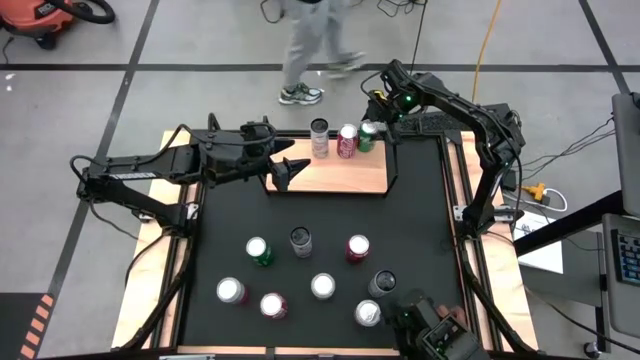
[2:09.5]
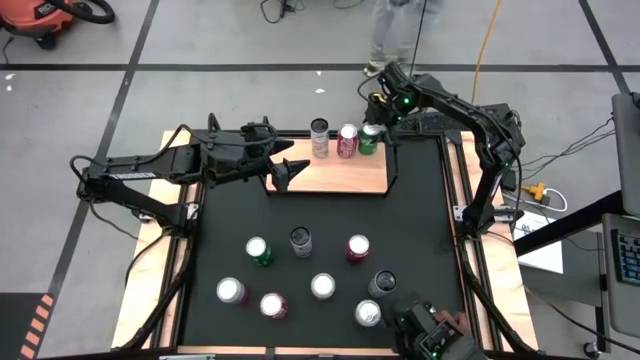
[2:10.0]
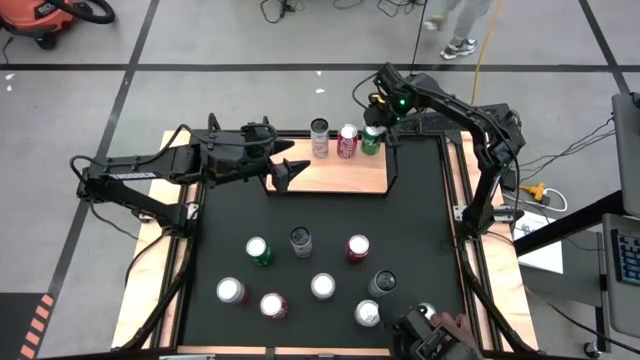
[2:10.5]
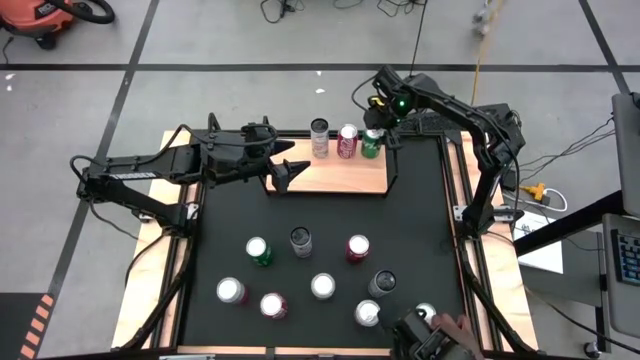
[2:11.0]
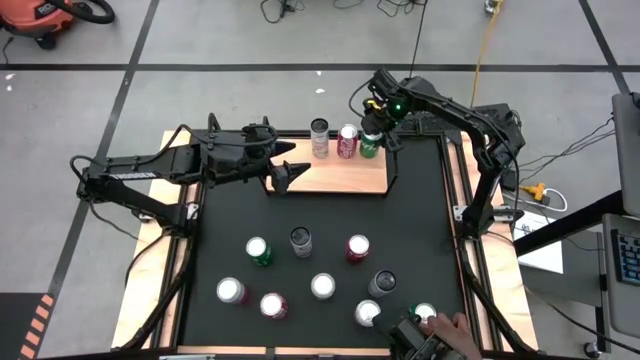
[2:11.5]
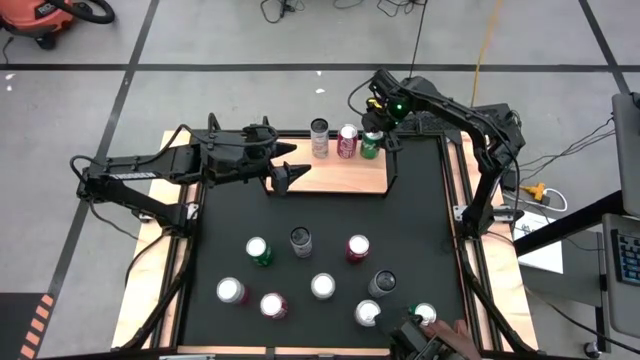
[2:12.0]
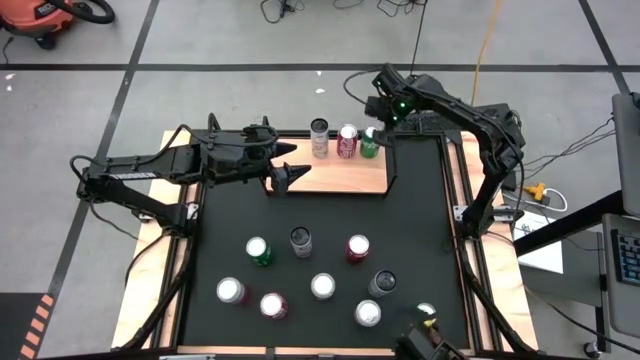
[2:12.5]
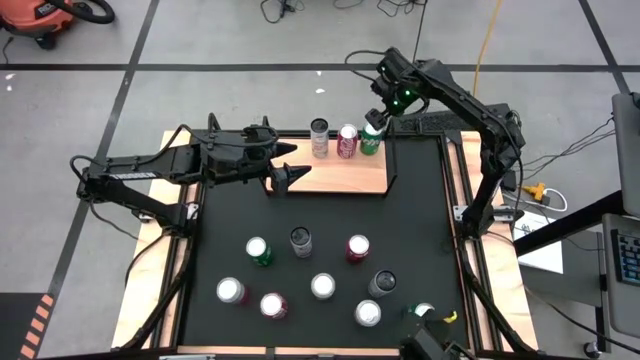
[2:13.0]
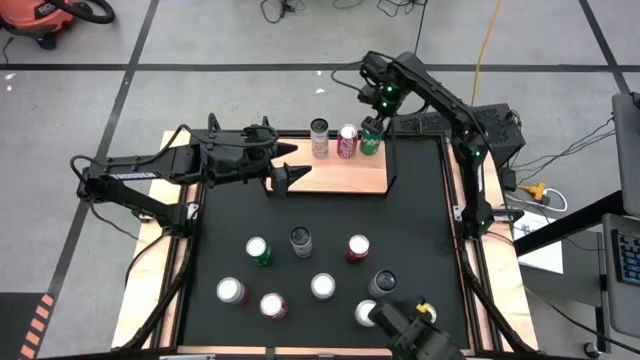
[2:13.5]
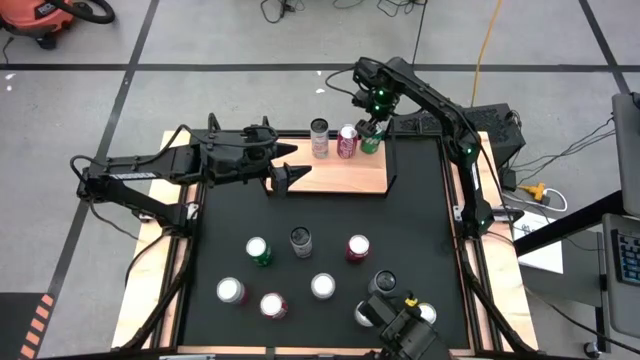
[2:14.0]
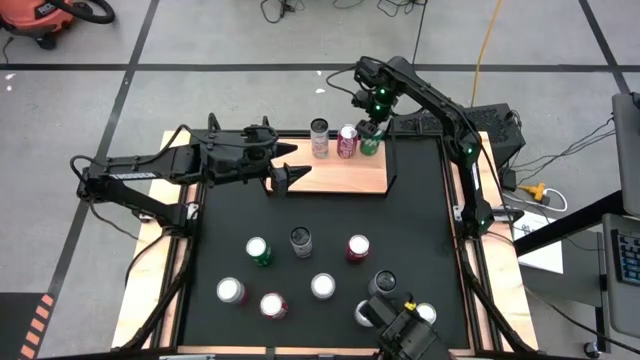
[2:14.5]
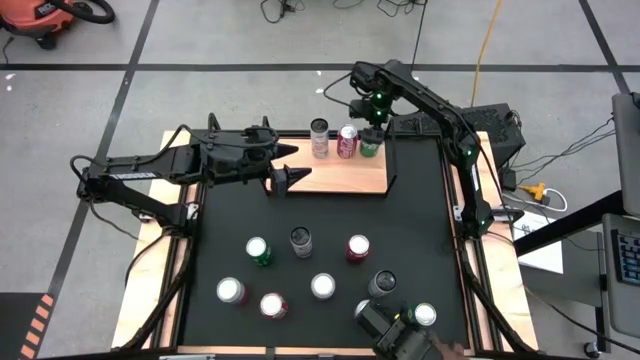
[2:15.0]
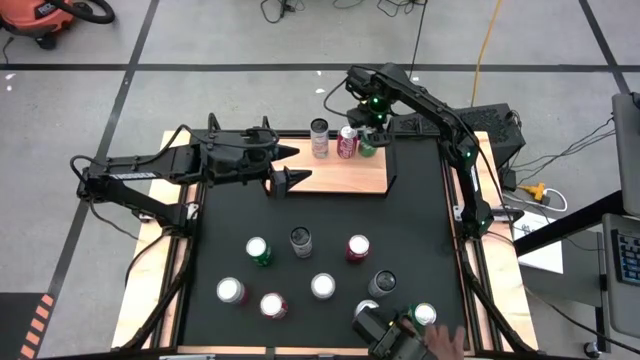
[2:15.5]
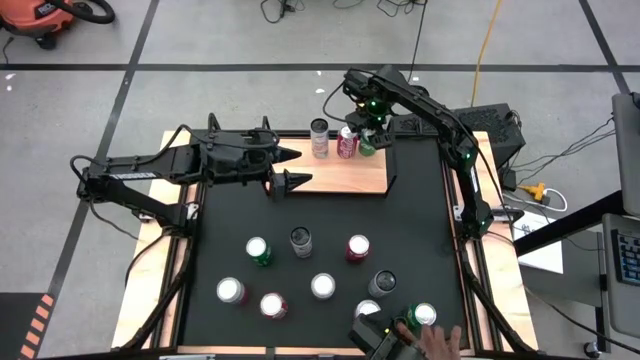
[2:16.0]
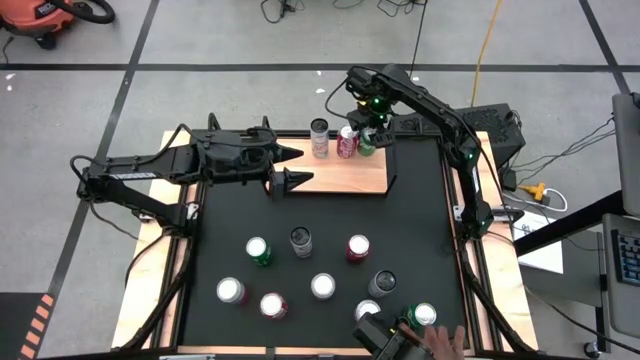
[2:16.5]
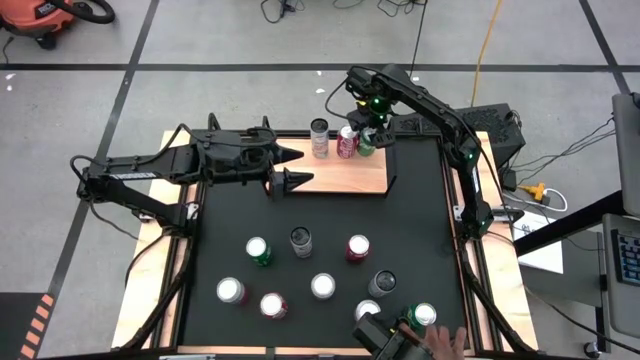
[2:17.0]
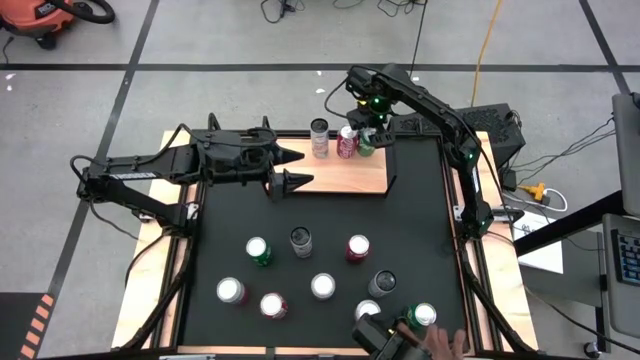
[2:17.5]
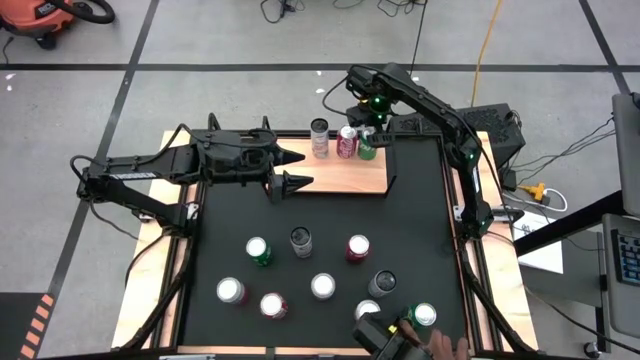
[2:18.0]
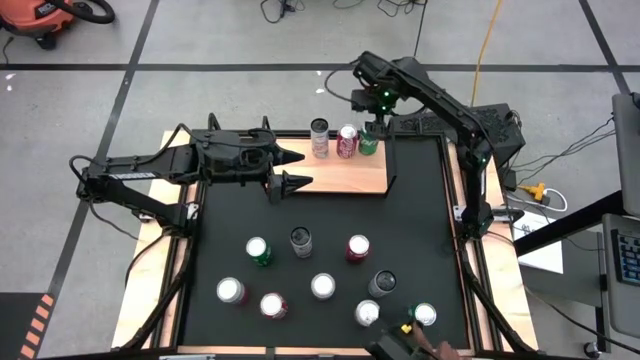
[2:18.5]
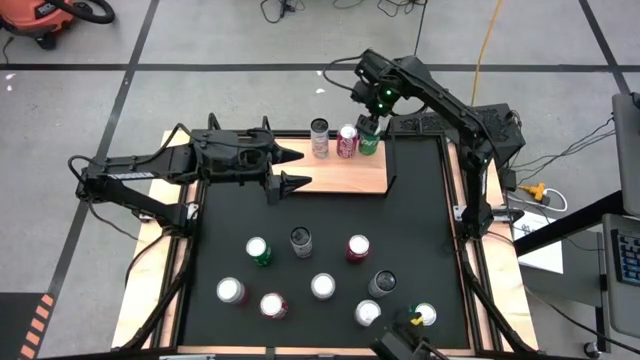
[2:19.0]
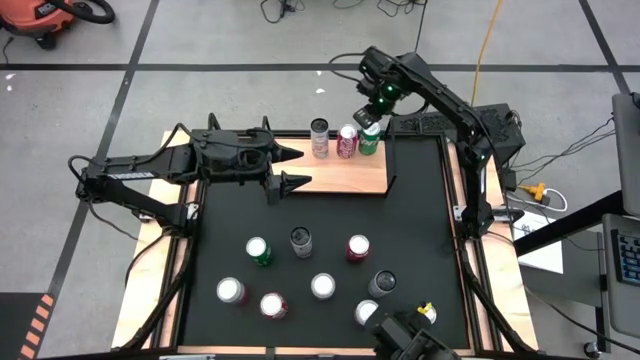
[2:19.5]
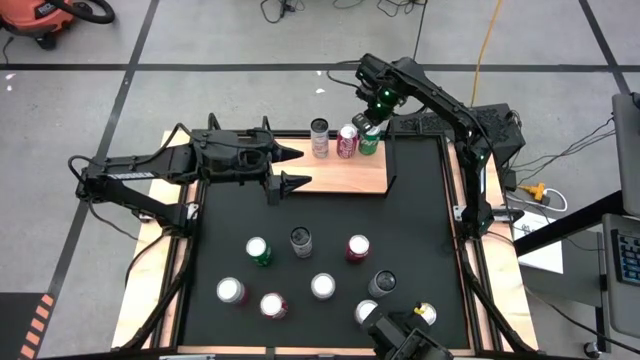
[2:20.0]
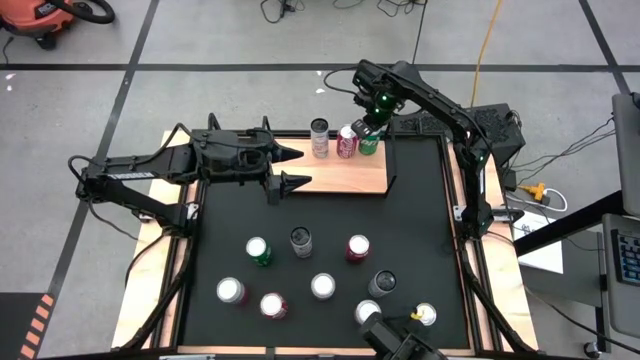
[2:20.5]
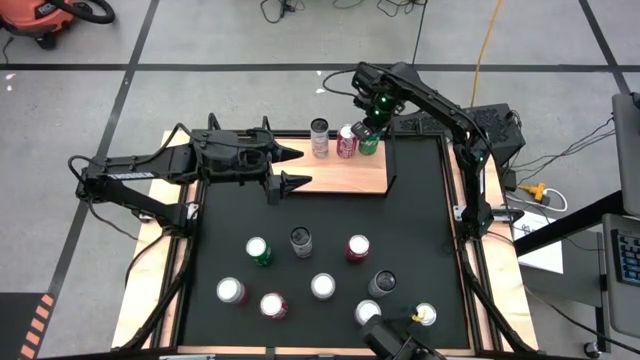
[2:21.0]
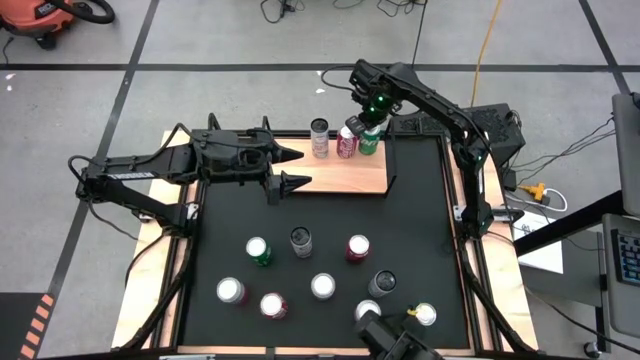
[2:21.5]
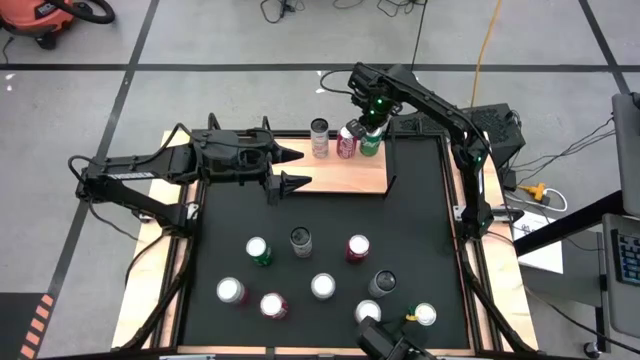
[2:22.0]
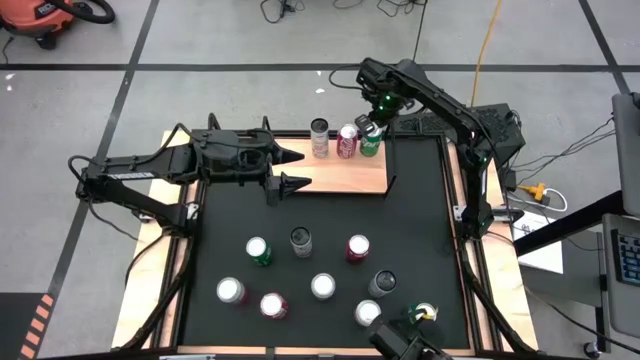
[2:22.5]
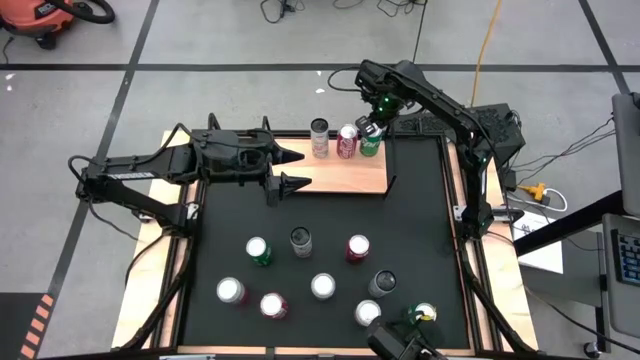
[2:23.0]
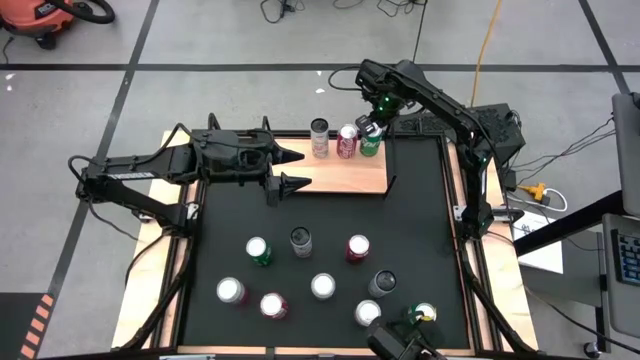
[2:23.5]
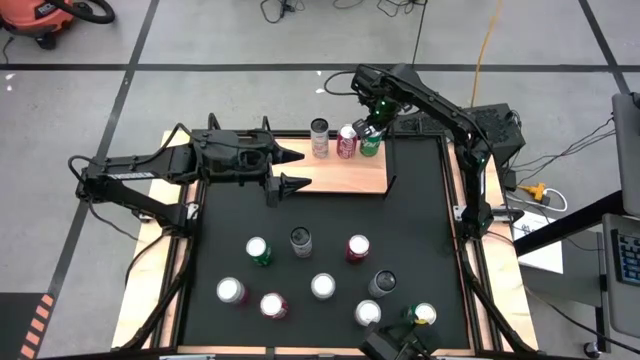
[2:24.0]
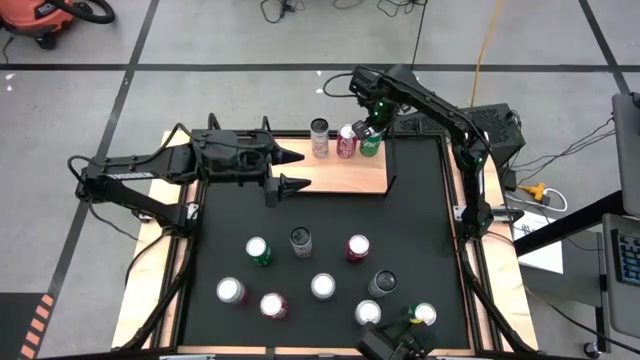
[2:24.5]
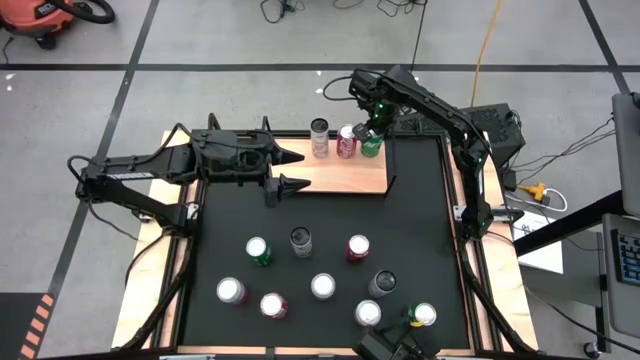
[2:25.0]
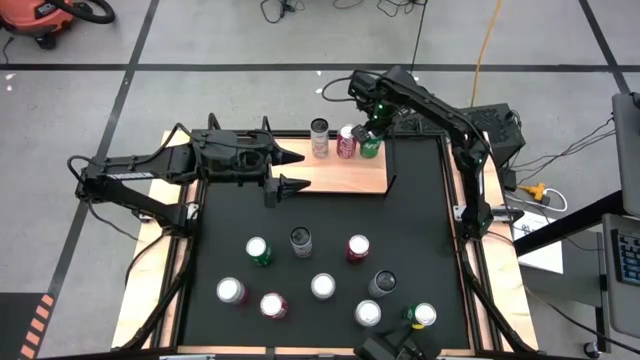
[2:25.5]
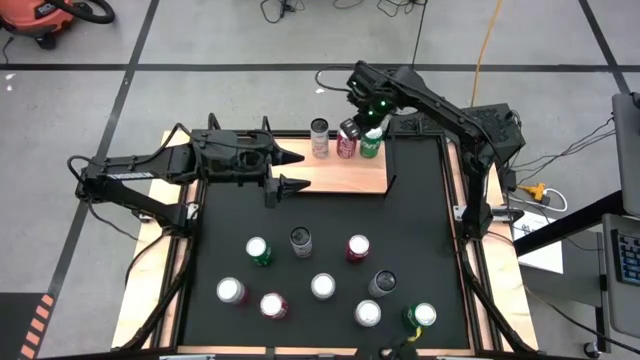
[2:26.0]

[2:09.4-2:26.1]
Task: Place canned beverage on shelf
Put the top red soda can on the shelf

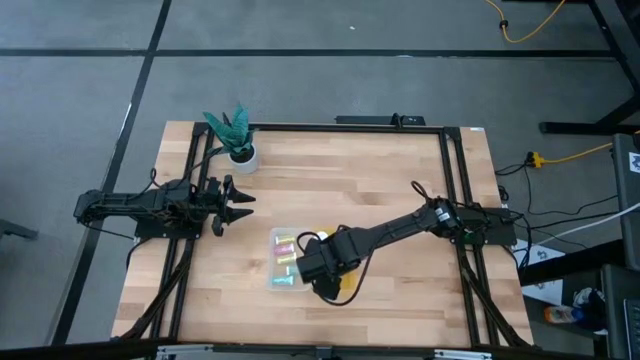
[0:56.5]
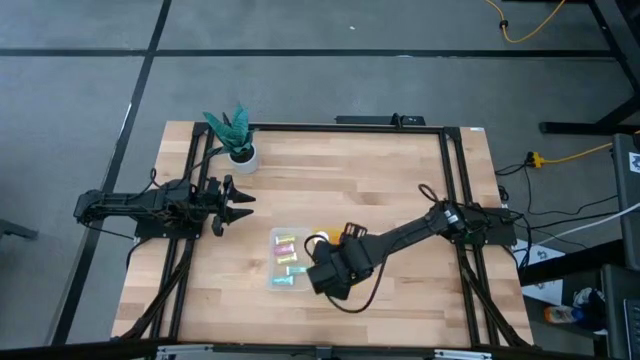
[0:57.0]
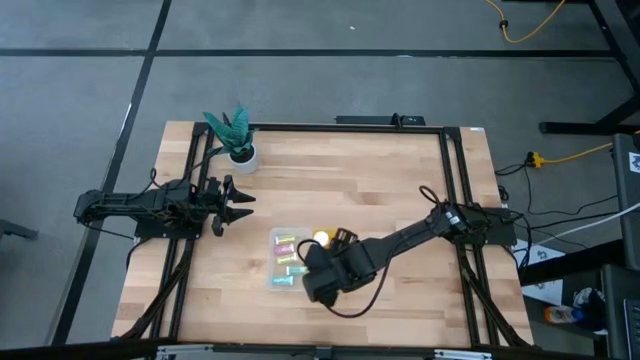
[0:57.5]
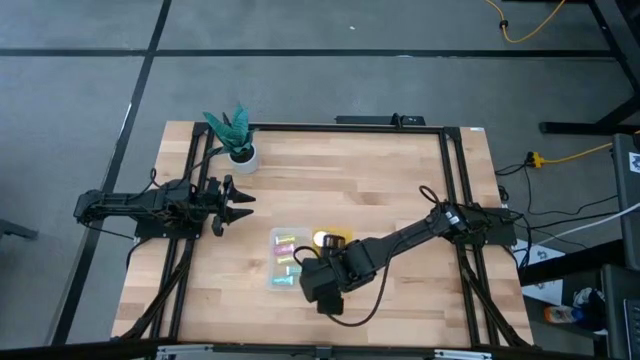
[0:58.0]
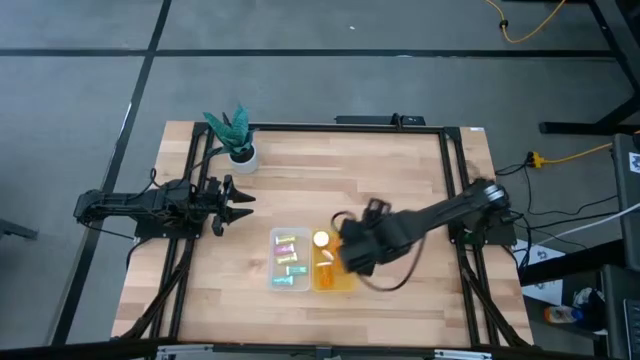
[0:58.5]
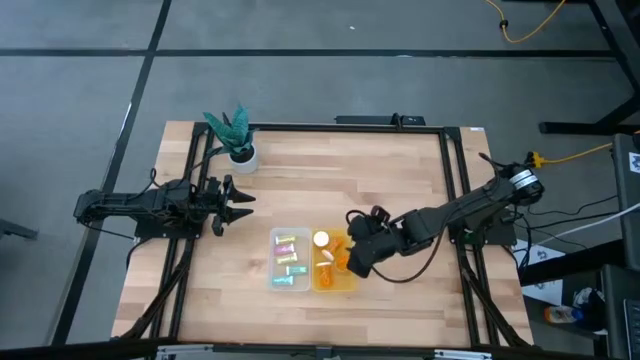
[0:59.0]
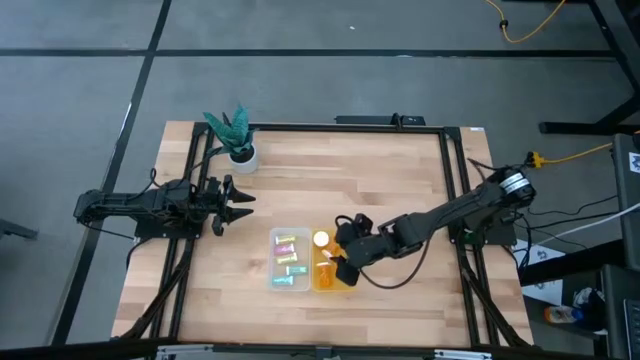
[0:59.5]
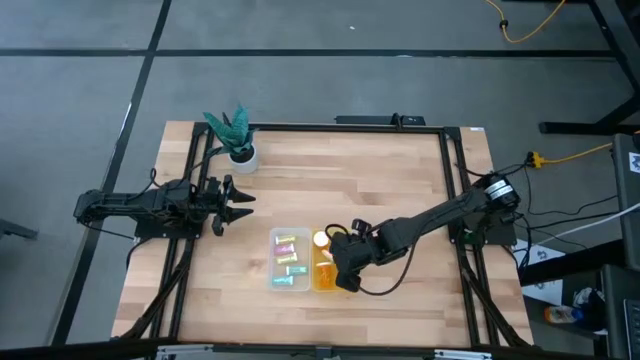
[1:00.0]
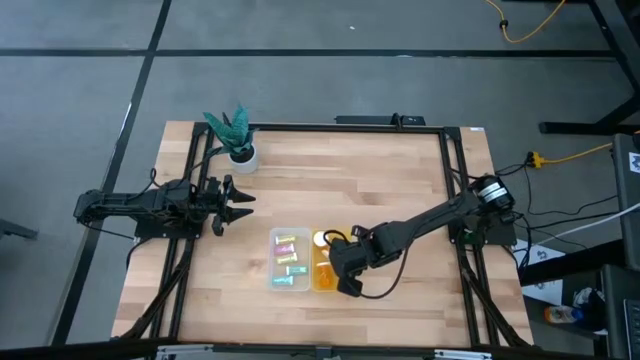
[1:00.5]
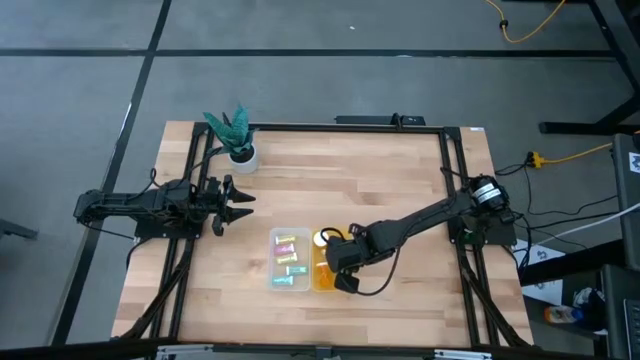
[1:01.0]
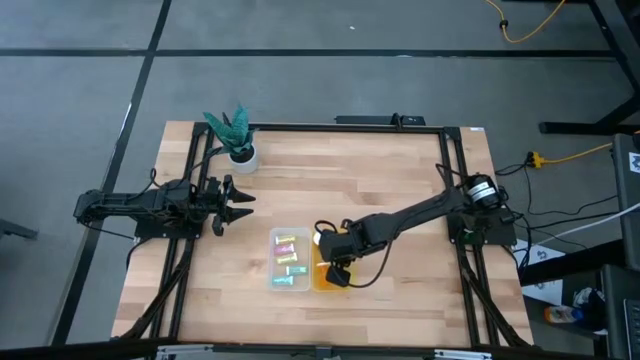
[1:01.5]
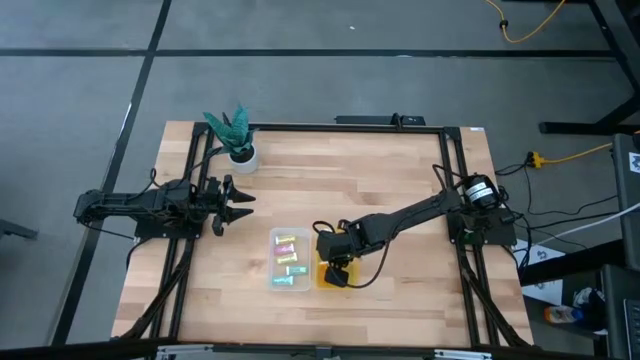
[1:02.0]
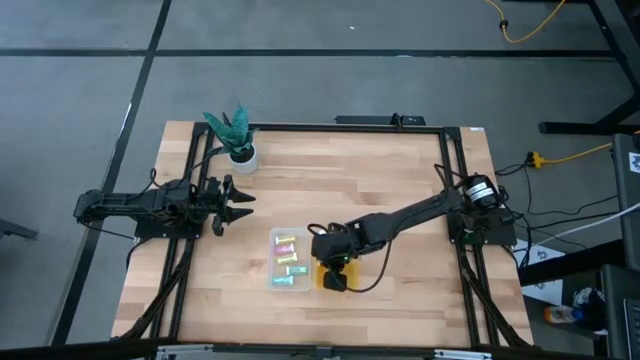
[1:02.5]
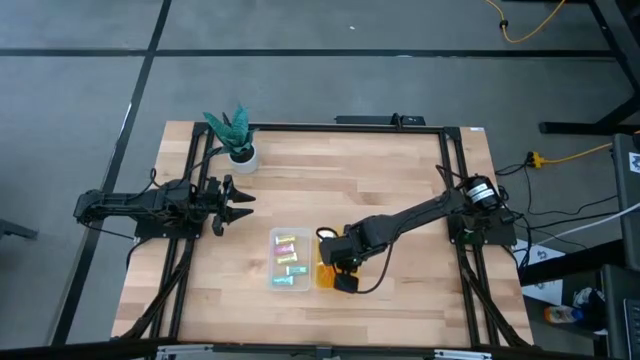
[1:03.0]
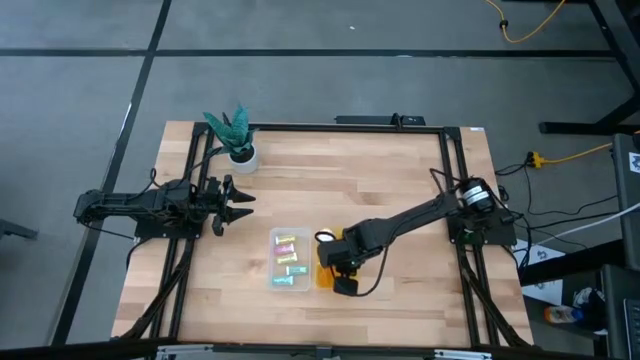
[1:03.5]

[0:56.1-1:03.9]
Task: Pick and place medicine bottles into bin by pill shape (circle, oval)
Adjust the orange capsule bottles in the yellow bin
